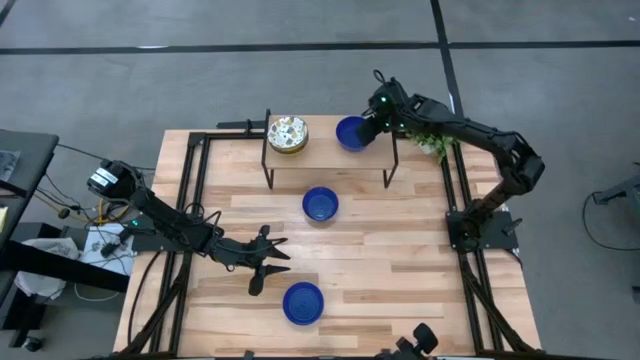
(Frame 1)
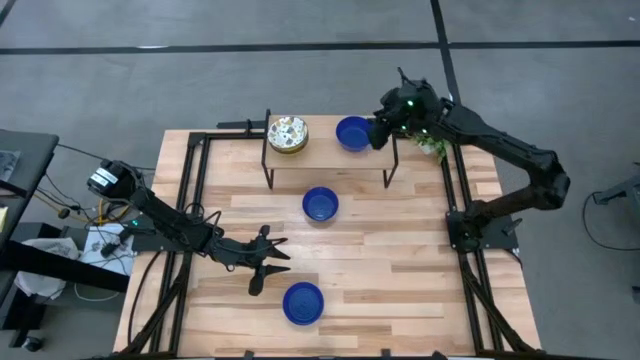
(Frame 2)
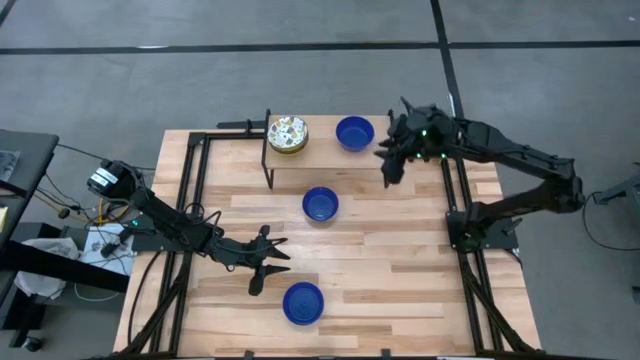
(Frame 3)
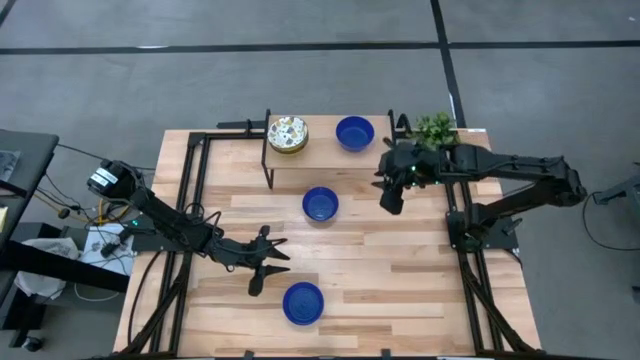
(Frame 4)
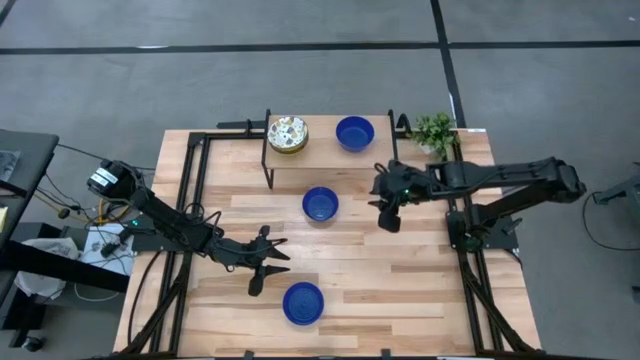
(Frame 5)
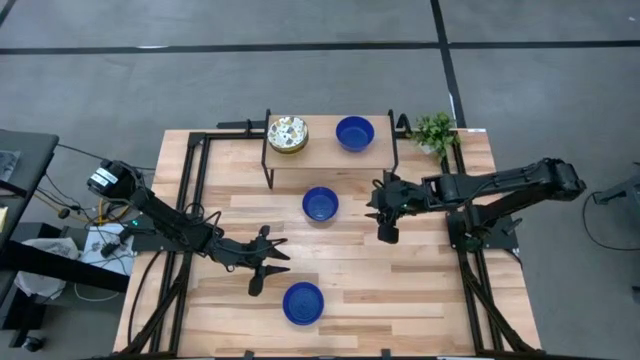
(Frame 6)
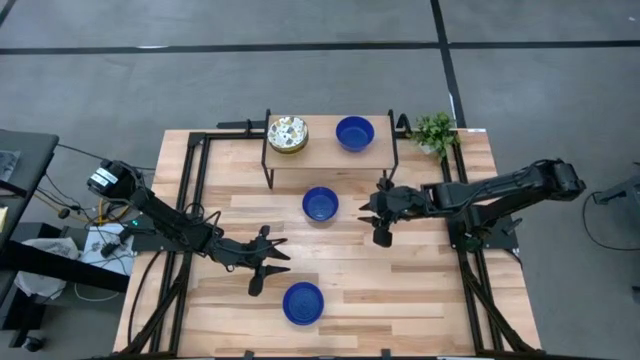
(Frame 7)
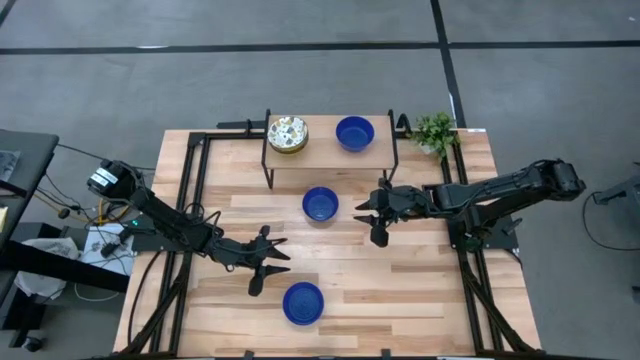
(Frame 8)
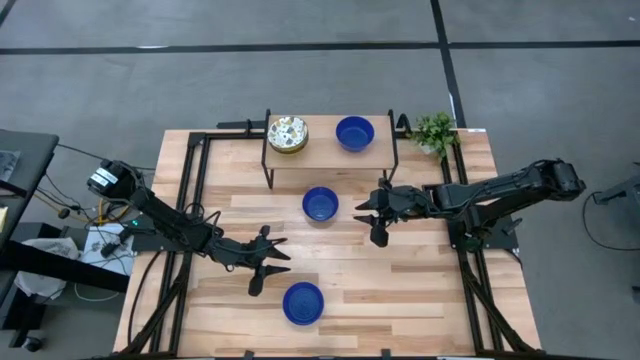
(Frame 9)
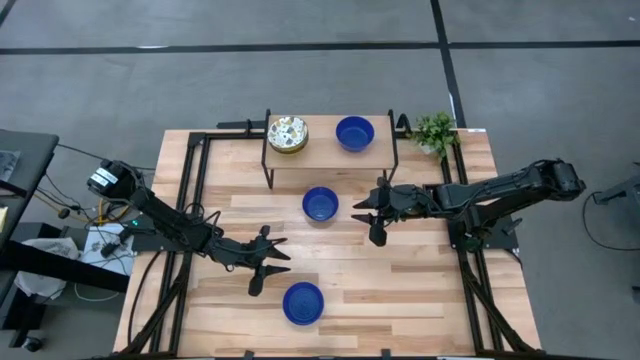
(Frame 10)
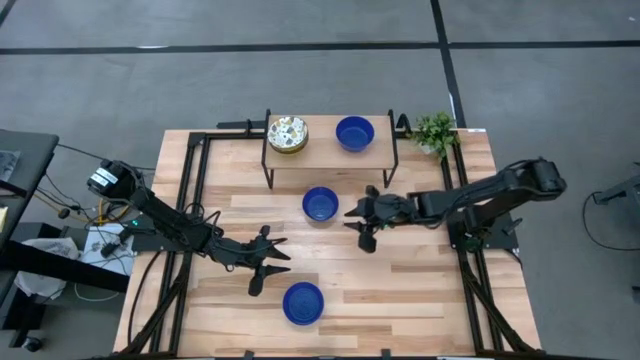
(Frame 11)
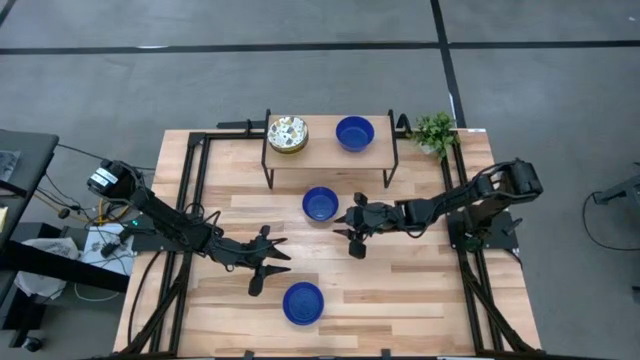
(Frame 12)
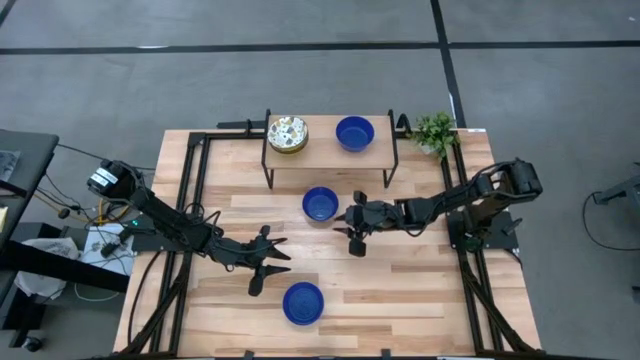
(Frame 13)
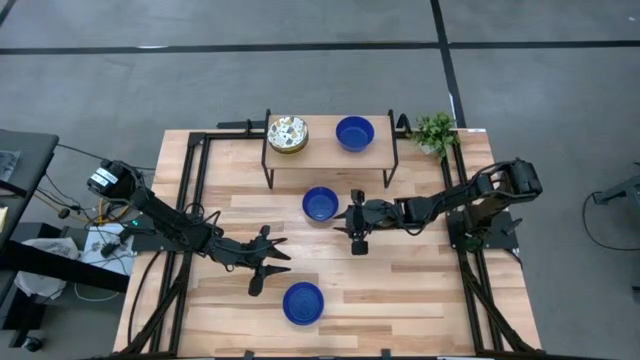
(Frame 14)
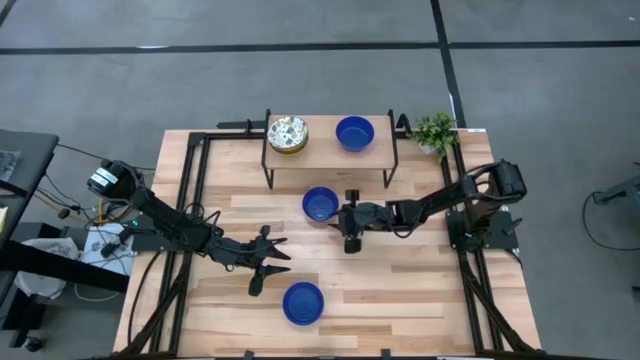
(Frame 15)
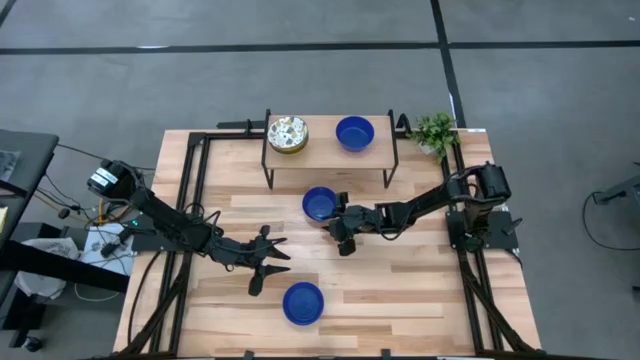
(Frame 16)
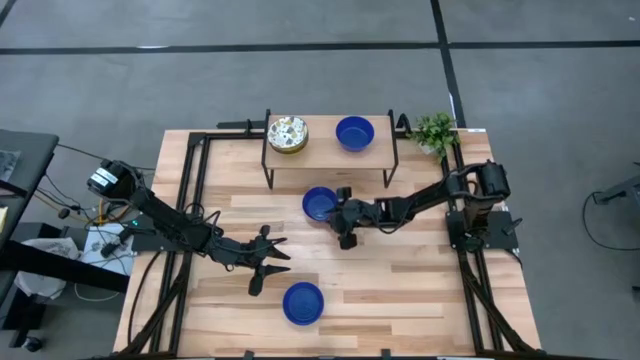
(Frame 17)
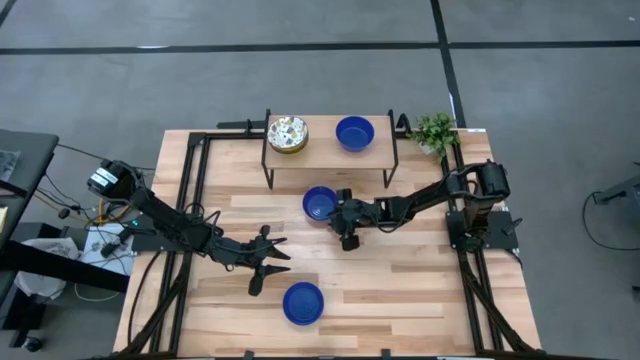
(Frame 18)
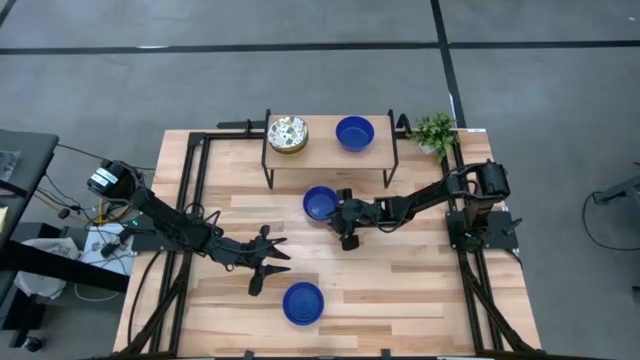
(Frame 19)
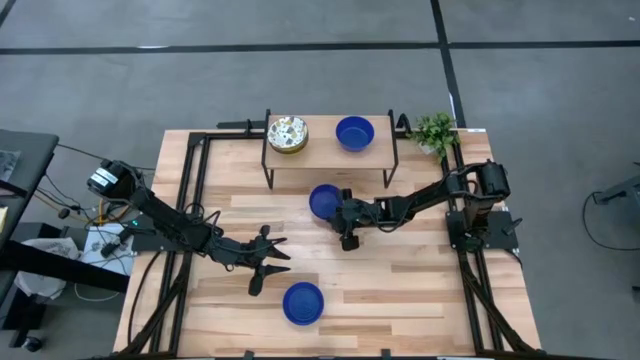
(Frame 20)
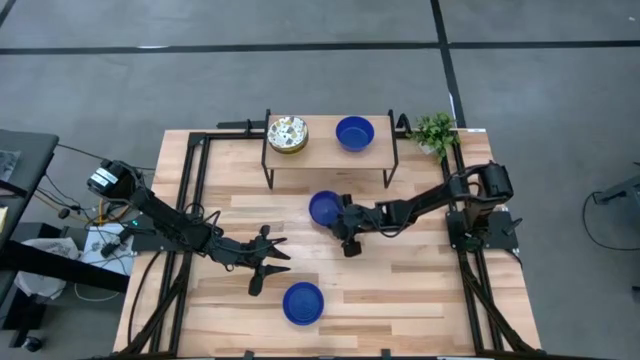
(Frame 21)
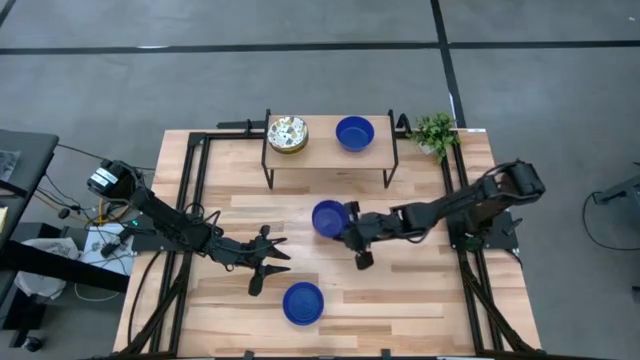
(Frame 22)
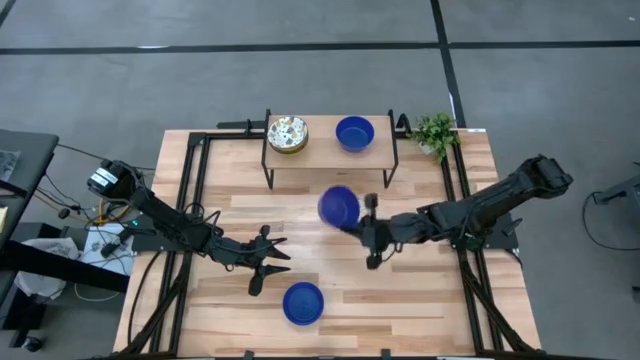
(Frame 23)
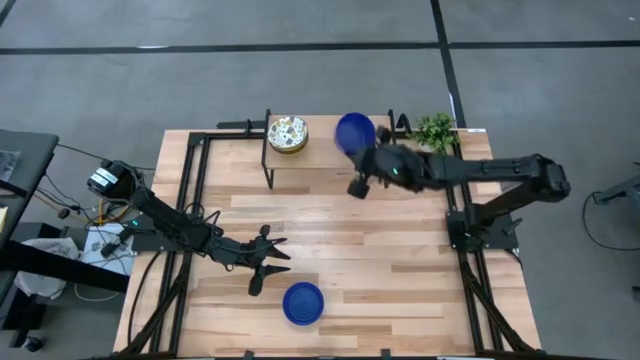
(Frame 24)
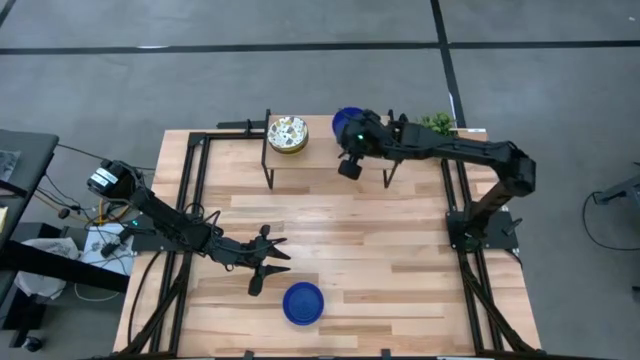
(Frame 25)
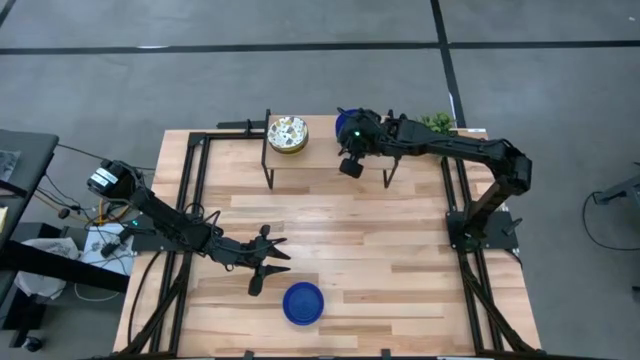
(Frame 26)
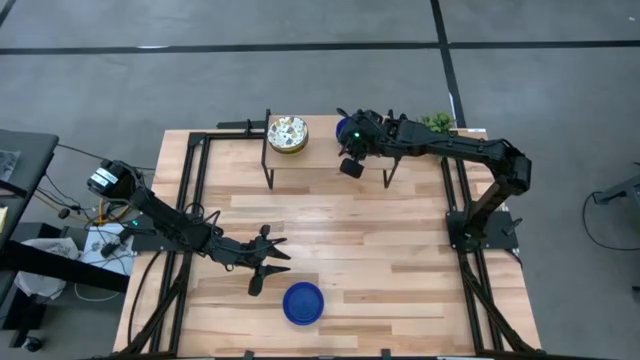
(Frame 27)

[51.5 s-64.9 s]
Task: Pick & Place Mini bowls
Put the top blue bowl on top of the blue bowl on the shelf
